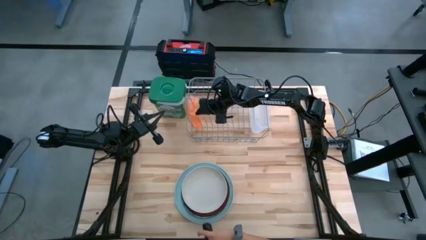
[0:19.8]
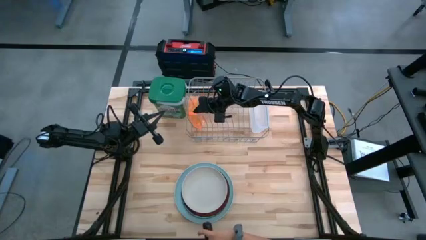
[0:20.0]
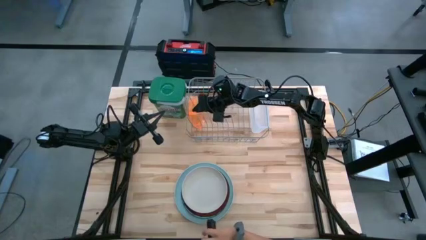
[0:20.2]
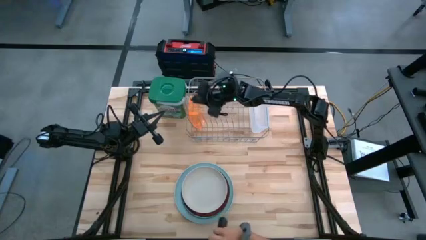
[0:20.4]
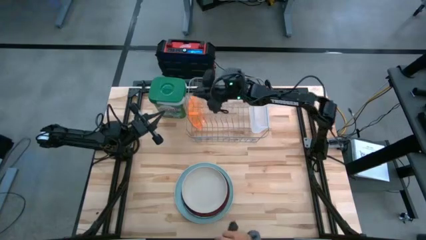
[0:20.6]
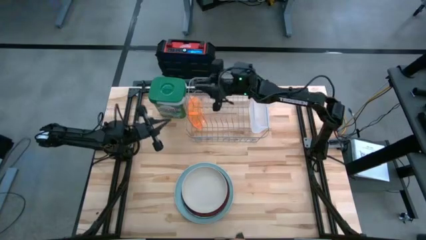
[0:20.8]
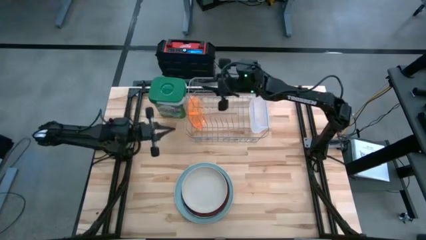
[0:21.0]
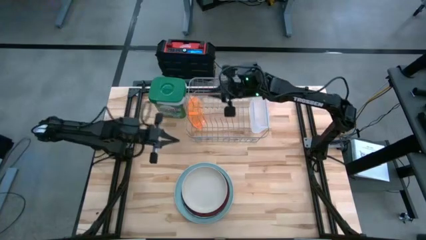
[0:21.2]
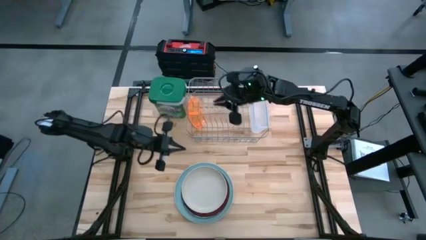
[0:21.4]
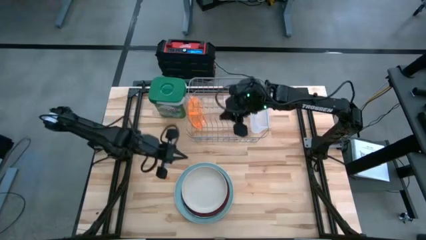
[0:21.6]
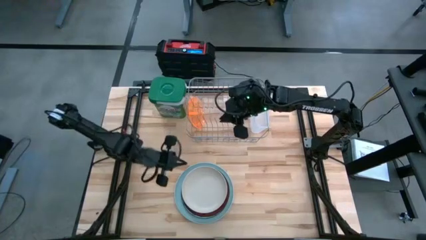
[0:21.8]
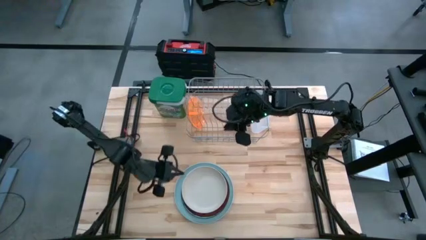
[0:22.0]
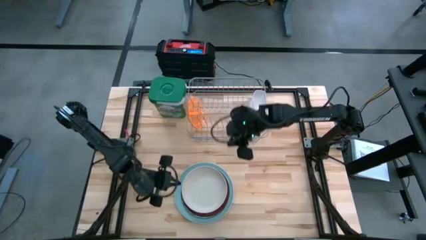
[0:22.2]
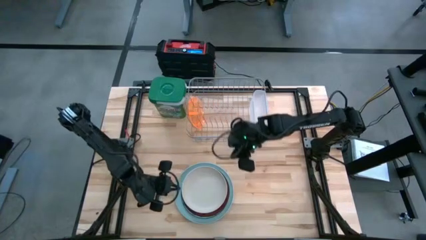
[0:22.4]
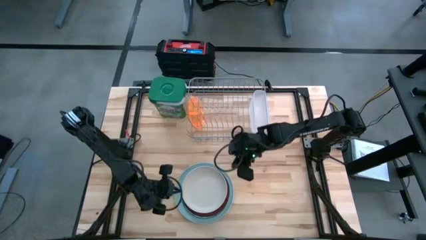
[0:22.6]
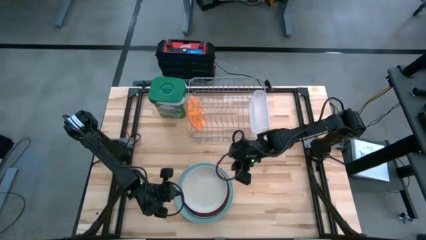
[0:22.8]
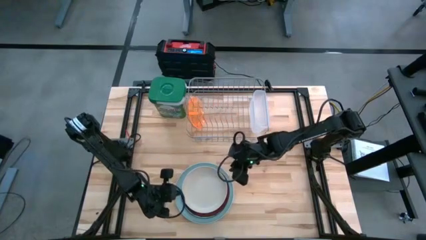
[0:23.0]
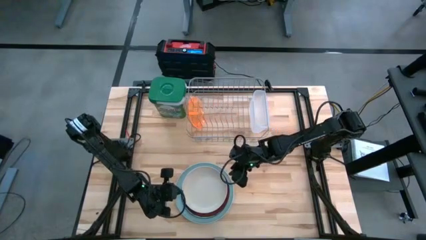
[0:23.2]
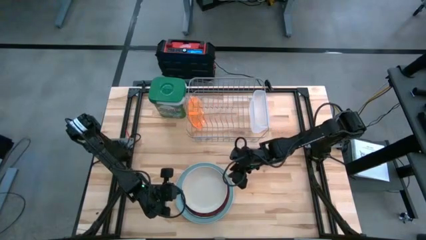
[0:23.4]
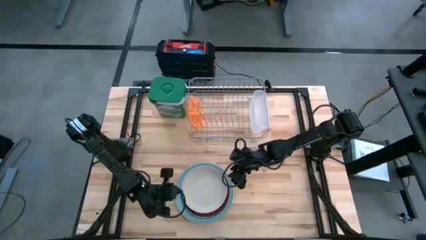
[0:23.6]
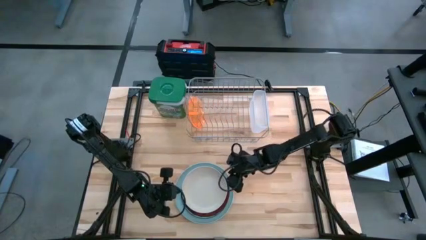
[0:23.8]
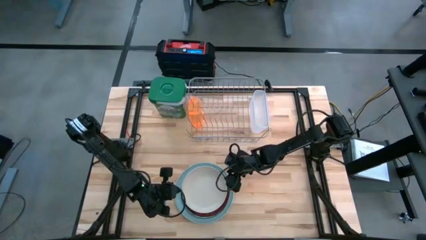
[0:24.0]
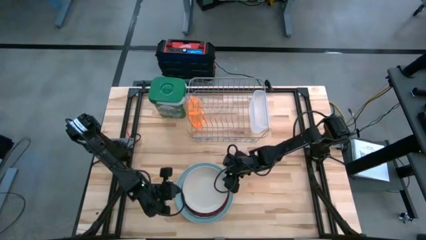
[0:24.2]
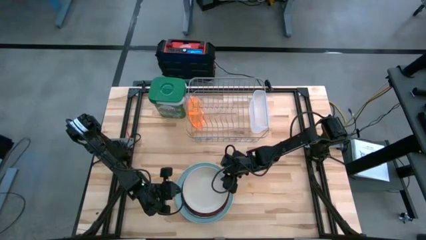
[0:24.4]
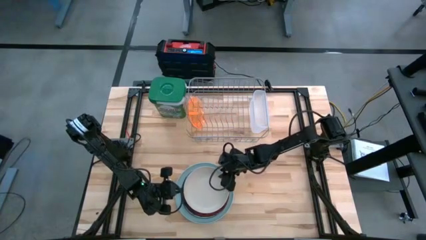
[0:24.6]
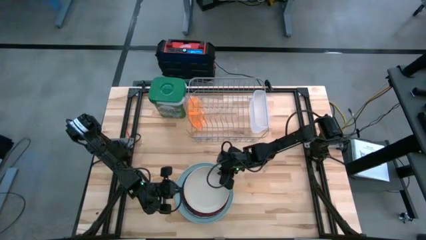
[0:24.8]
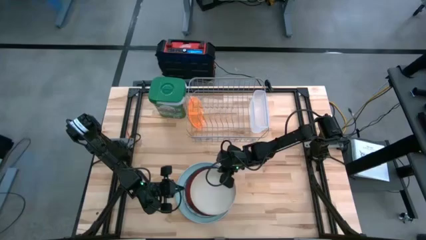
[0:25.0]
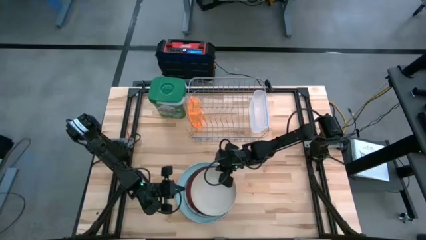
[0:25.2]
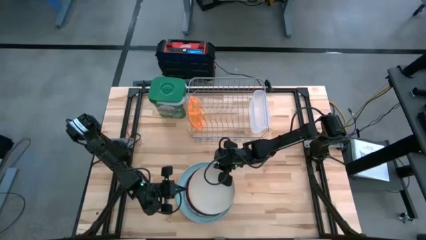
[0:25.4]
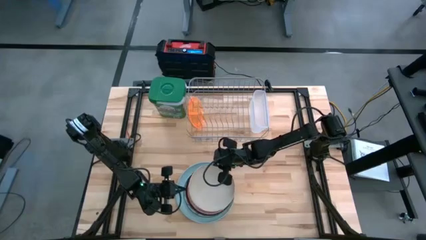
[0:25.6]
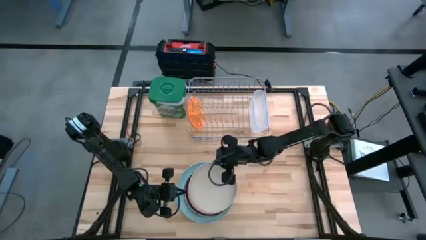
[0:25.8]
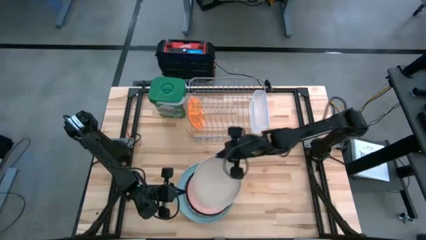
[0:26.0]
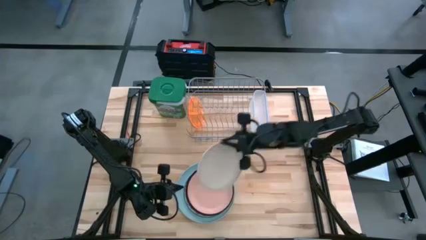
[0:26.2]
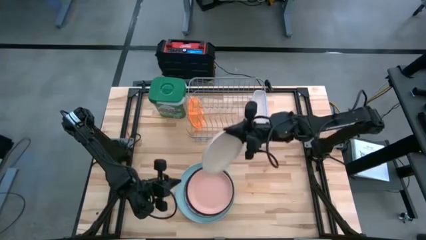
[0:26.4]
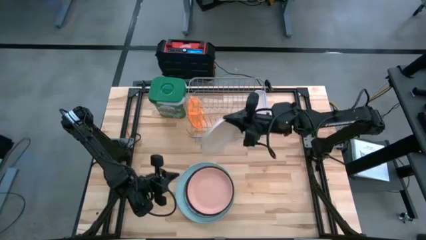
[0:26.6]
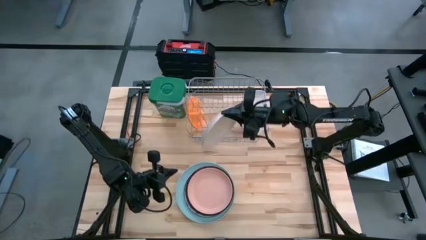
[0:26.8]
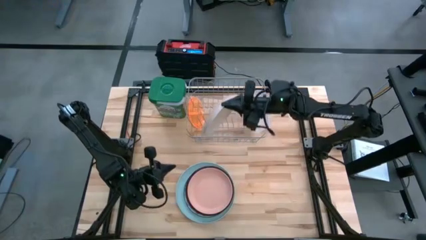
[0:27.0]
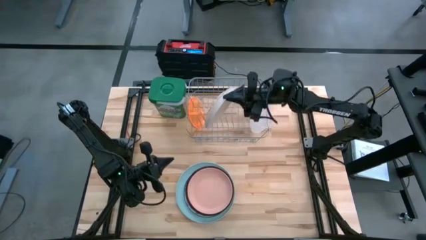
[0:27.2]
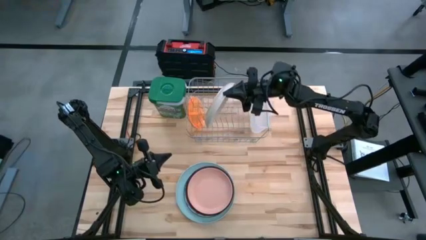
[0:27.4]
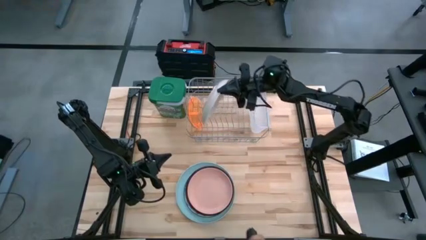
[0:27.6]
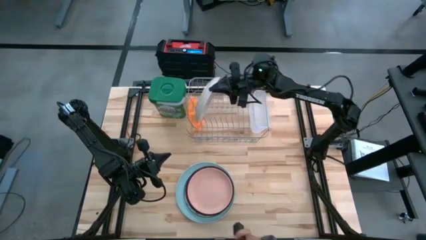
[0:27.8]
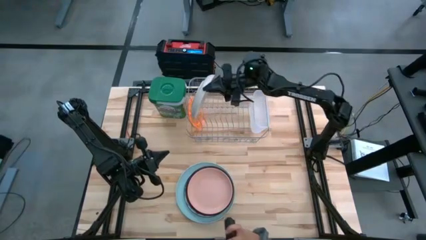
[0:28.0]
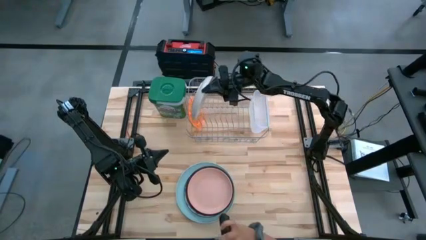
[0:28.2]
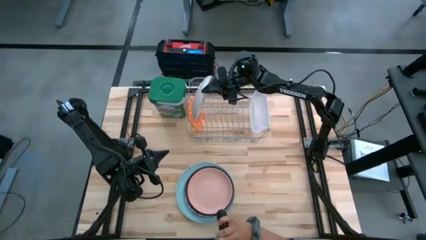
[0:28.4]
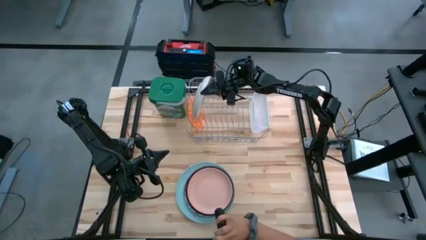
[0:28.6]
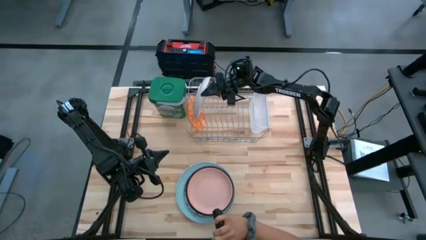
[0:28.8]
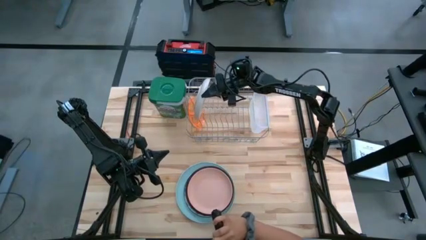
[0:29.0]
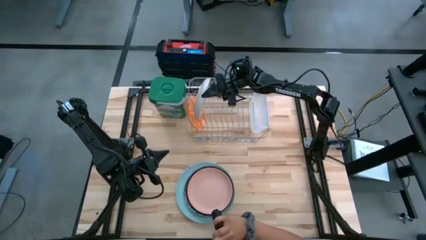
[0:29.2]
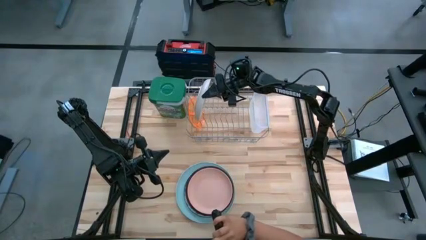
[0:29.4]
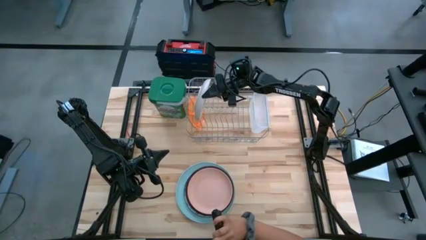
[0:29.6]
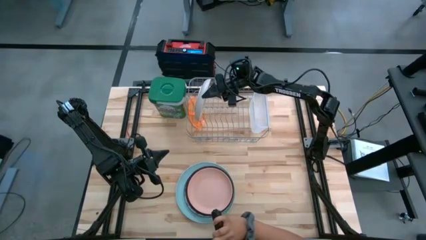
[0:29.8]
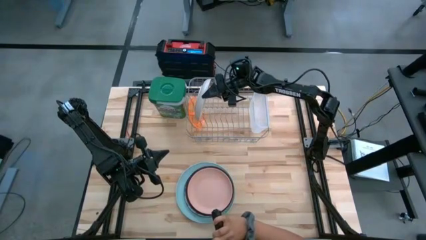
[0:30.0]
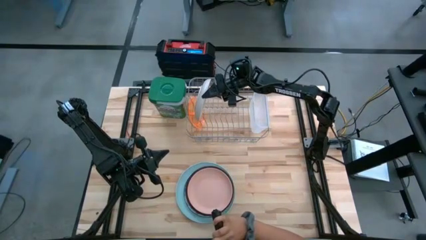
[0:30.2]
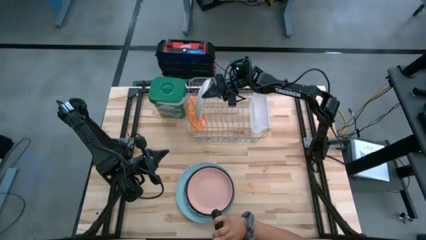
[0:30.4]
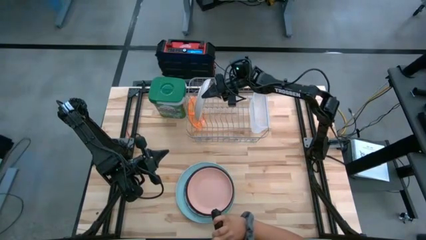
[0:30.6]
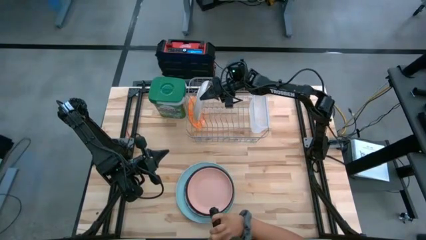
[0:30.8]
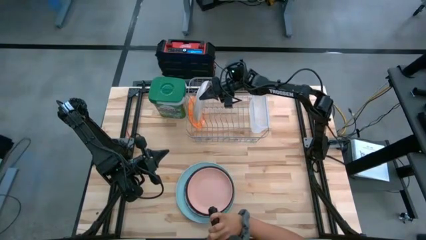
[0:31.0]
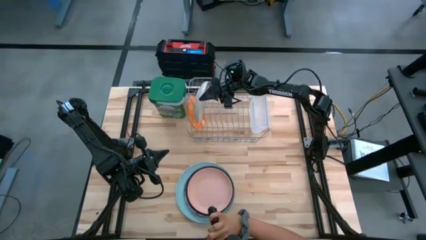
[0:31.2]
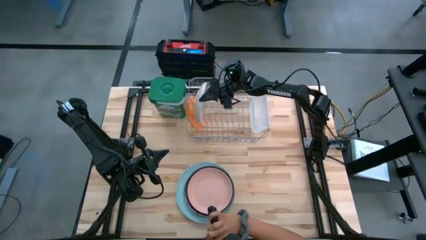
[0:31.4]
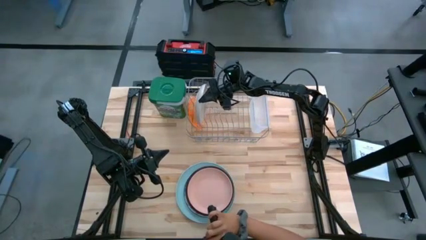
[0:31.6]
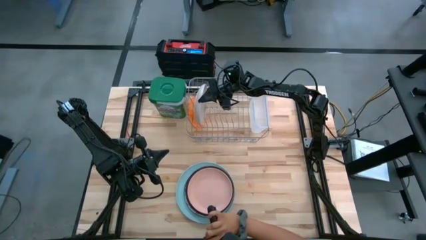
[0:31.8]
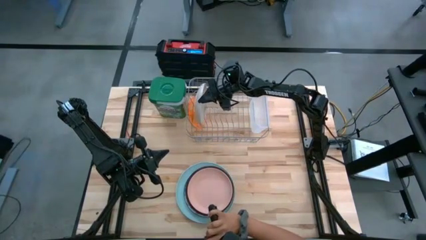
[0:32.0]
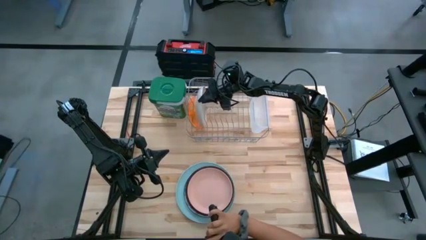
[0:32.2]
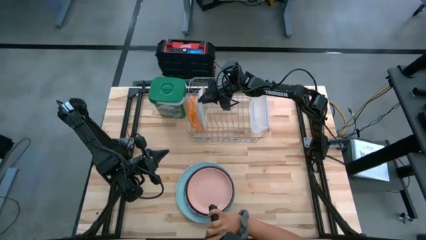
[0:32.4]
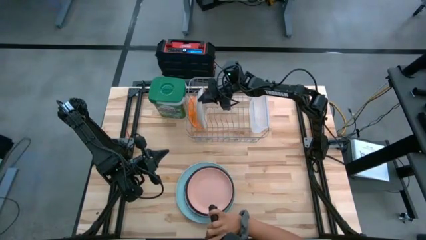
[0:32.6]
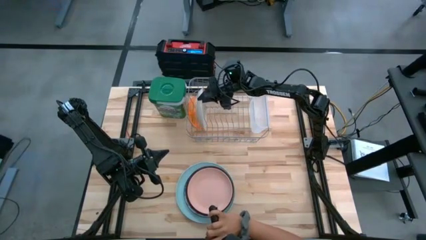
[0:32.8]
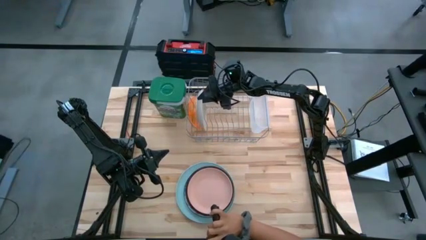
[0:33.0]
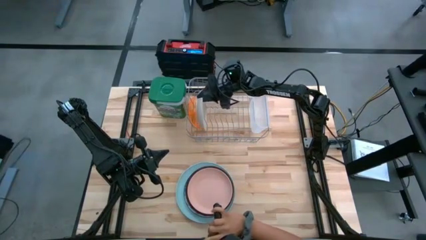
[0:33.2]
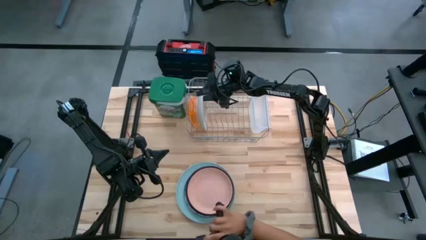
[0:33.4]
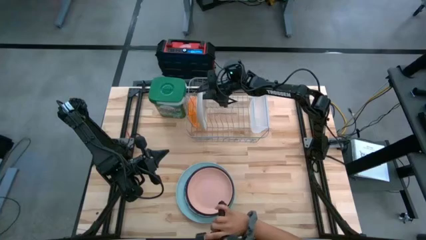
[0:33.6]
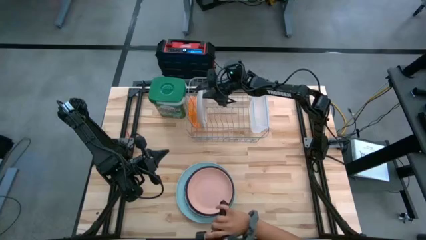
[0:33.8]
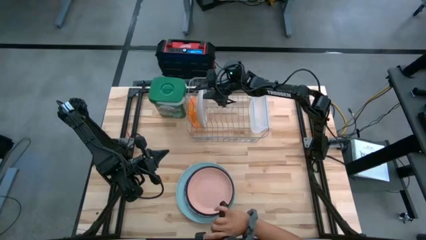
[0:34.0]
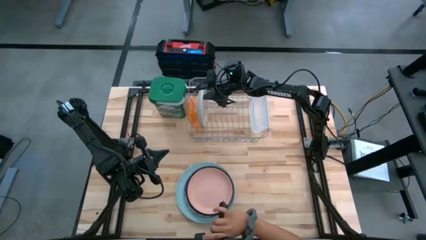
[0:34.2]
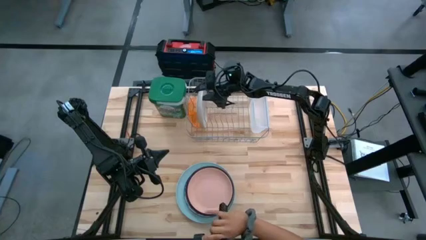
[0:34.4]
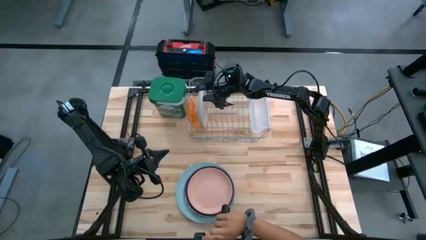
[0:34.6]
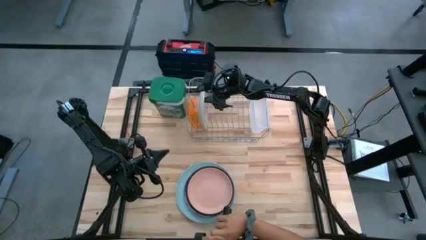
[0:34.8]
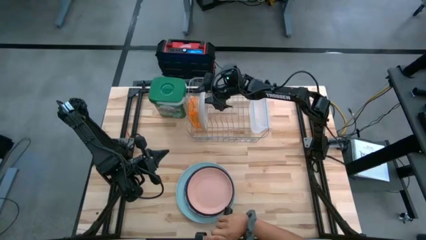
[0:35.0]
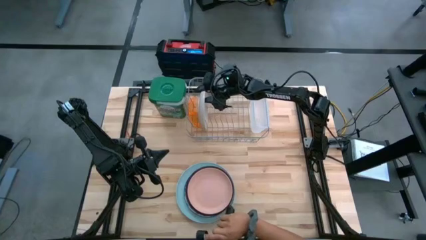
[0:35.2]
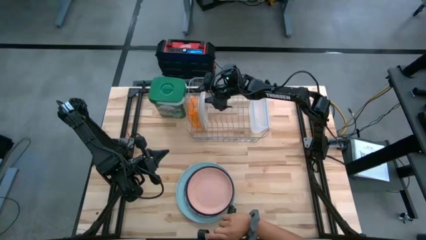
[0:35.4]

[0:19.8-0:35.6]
Task: Sort dishes
Put the white plate in the dishwasher rack
